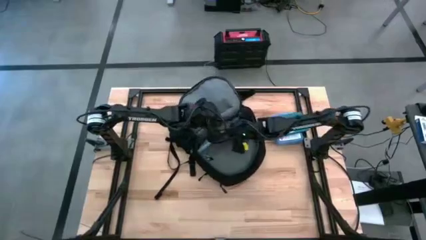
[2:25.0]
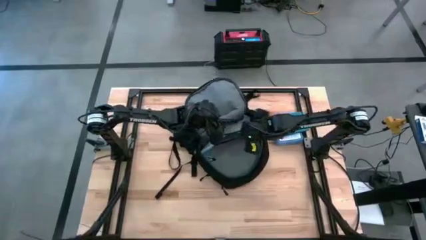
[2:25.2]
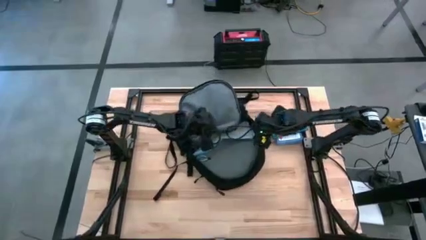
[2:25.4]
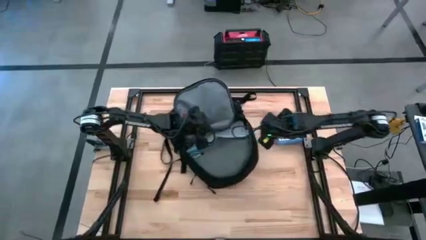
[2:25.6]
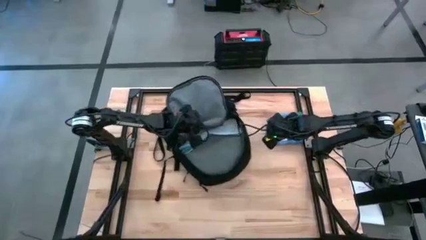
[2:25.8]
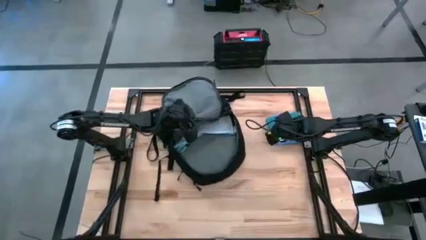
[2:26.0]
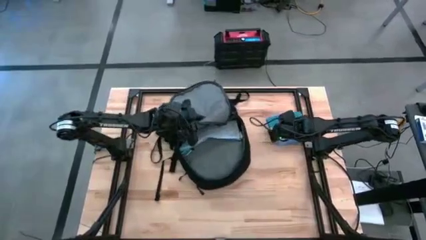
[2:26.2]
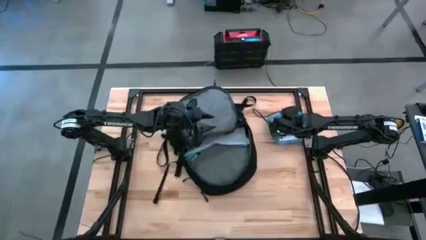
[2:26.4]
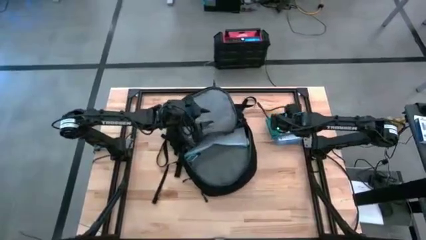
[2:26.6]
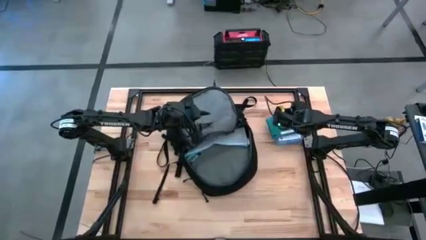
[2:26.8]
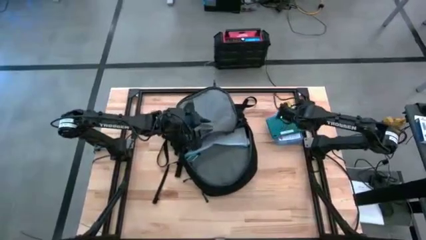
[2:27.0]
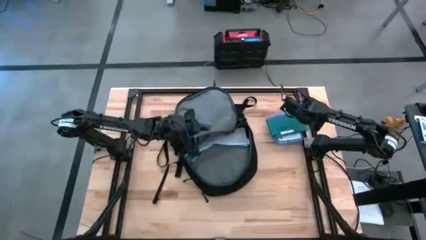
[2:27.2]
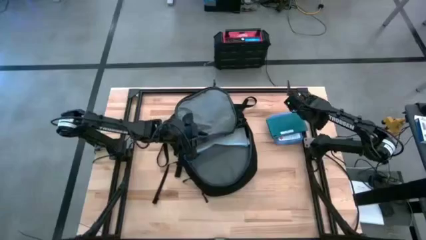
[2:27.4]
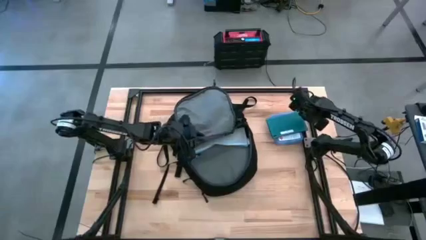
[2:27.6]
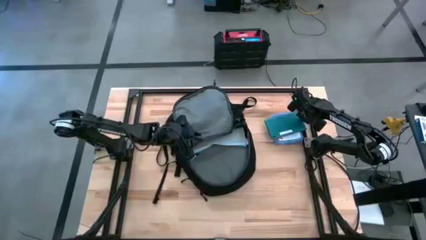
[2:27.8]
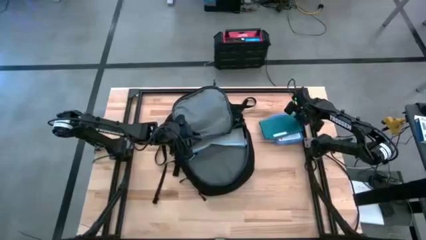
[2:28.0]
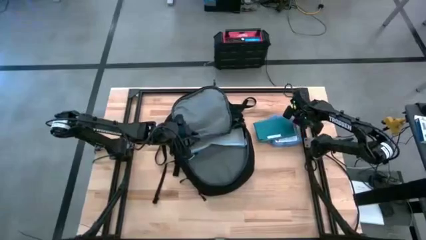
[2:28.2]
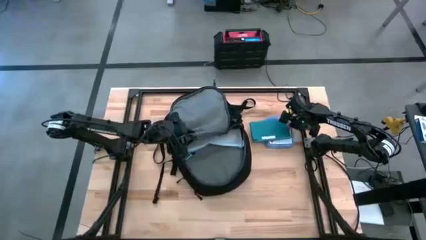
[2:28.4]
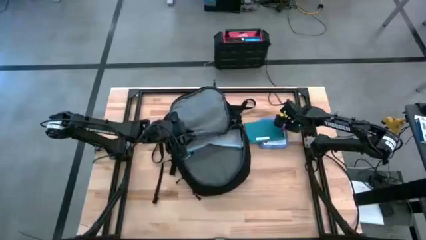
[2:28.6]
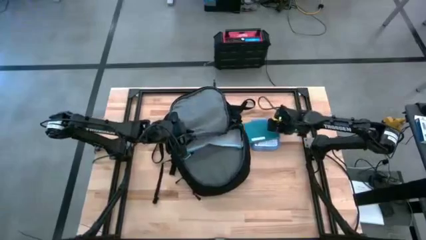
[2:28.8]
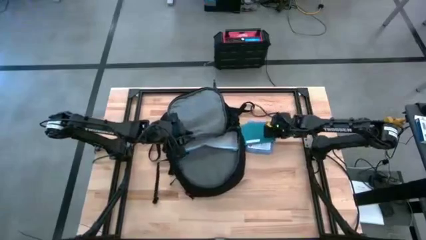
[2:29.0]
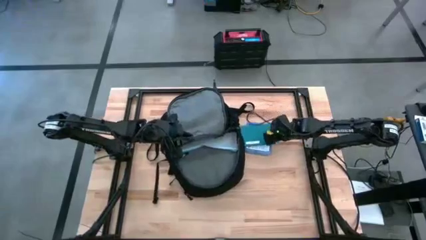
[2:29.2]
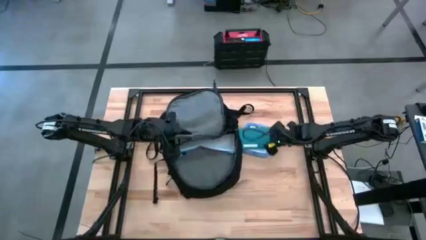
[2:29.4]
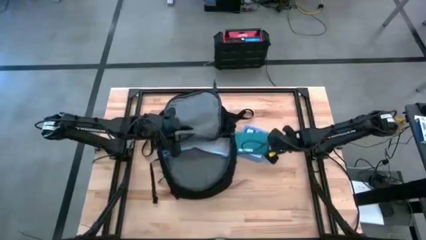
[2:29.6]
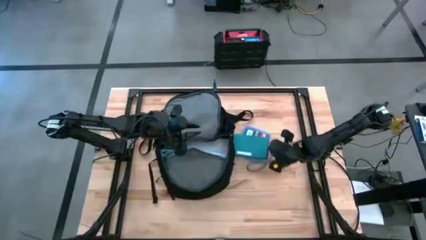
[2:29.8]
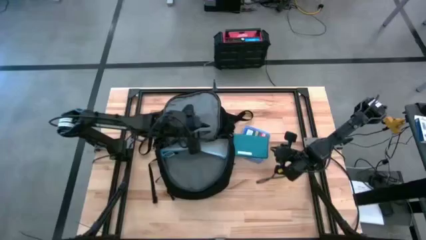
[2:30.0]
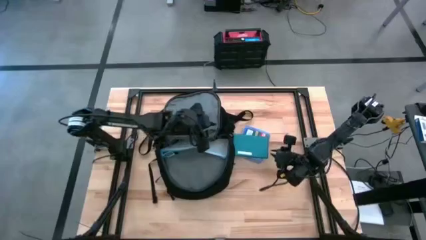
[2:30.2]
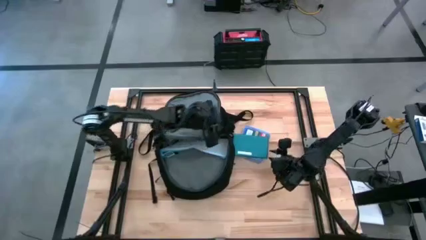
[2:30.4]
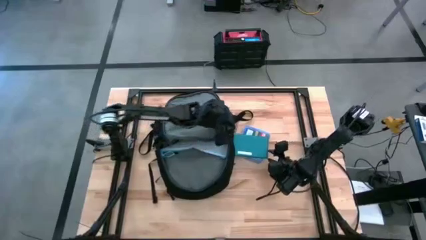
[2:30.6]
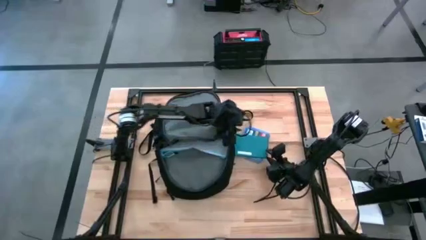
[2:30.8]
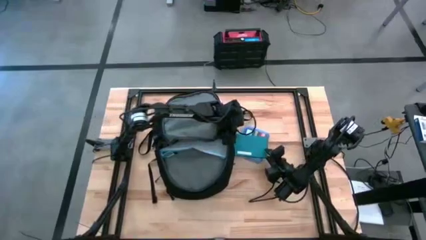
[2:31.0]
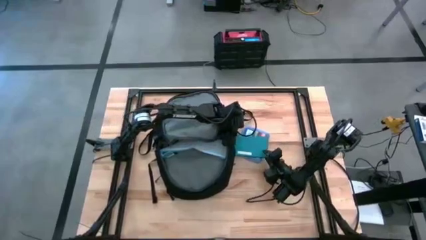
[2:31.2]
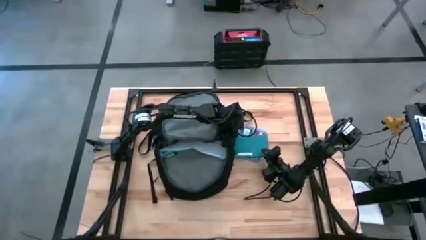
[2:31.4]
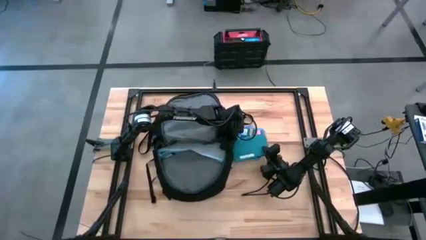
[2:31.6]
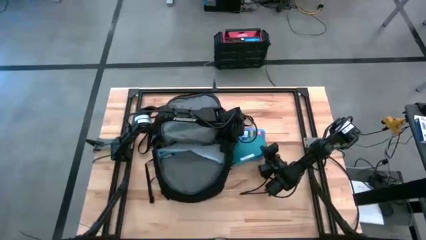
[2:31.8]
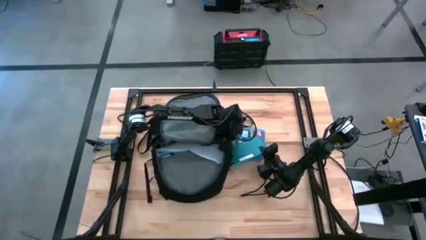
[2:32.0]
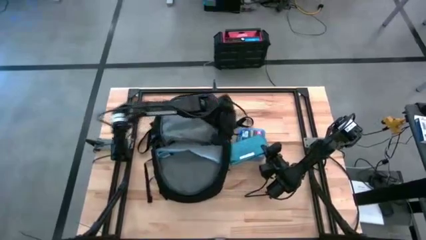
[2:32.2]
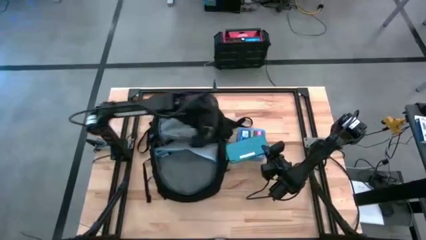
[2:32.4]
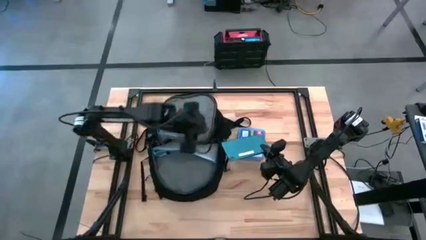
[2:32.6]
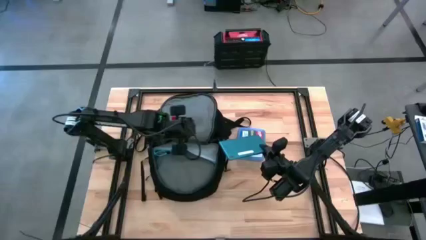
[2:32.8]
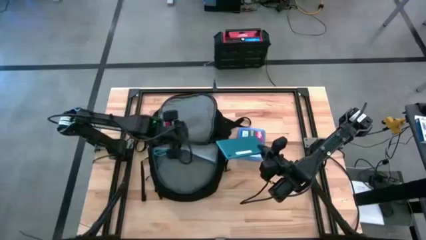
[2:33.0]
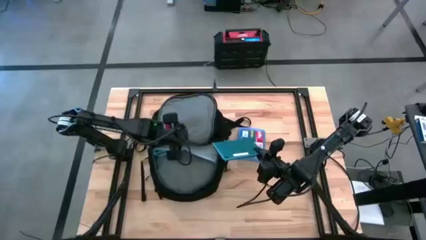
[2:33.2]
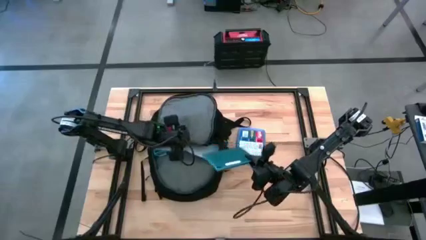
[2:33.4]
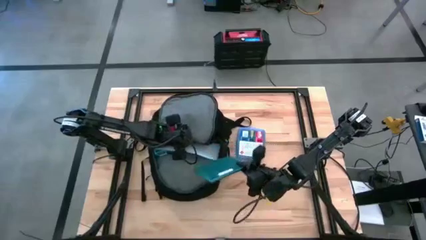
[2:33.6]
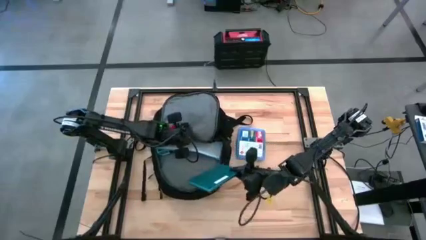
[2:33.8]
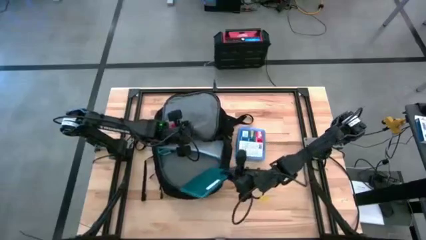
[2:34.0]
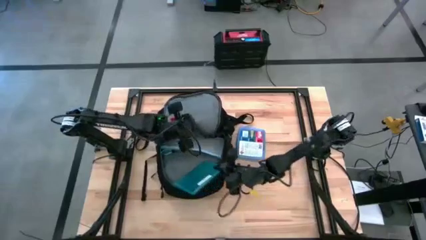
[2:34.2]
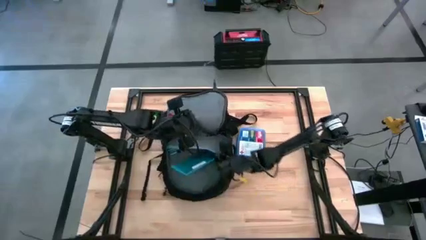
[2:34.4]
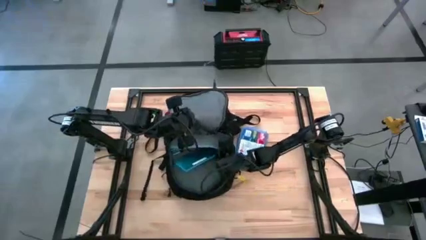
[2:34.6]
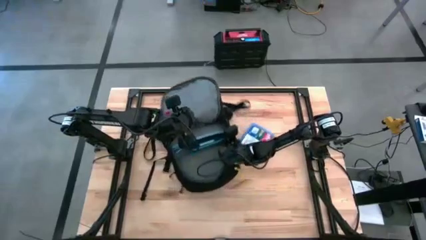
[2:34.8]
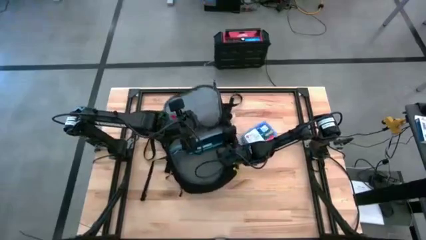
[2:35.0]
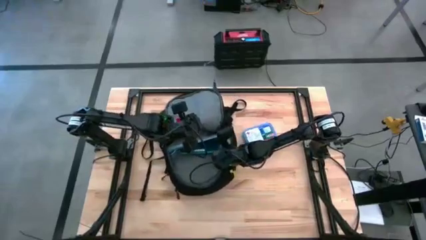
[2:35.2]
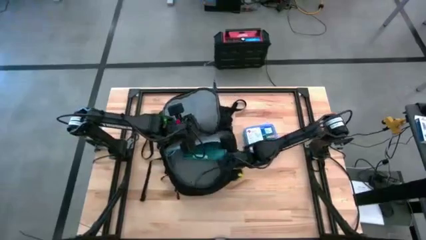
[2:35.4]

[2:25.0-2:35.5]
Task: Unpack backpack
Put the blue tablet device into the black backpack

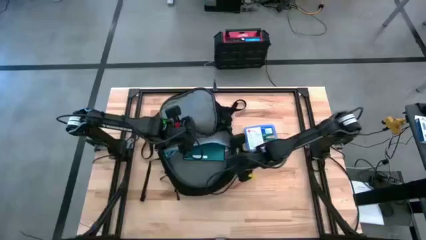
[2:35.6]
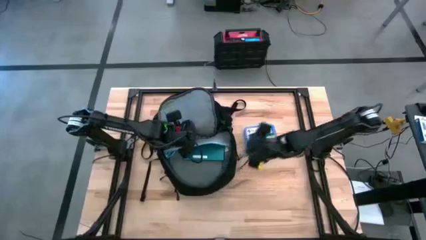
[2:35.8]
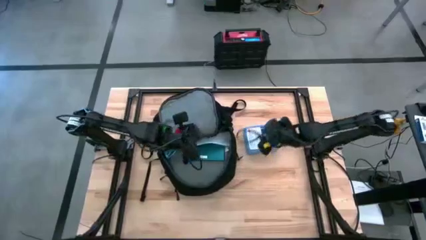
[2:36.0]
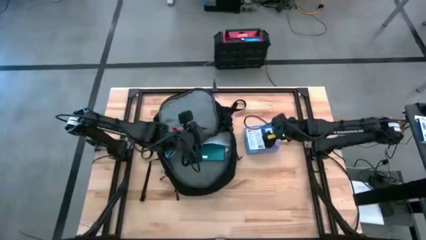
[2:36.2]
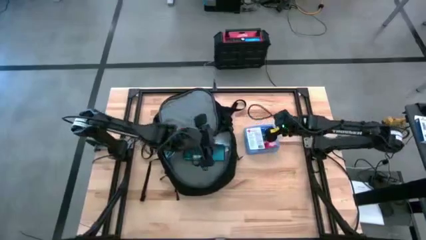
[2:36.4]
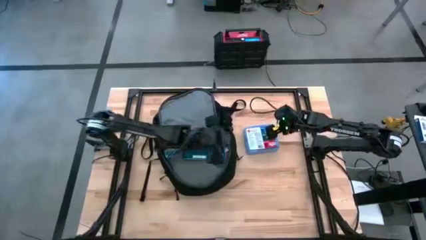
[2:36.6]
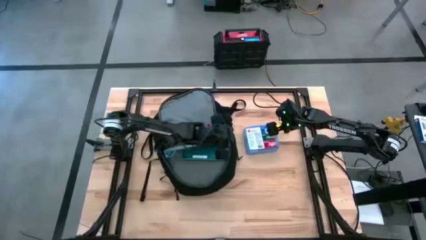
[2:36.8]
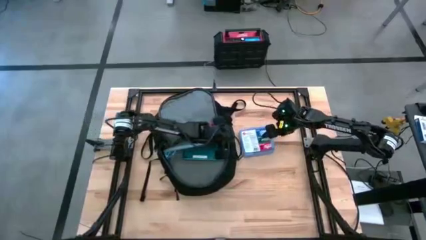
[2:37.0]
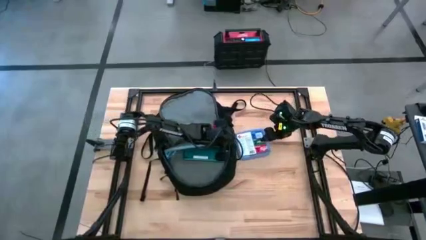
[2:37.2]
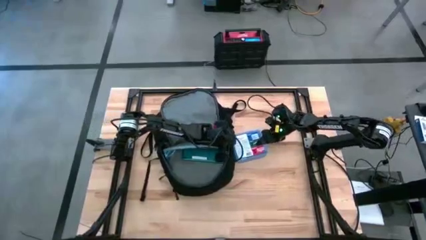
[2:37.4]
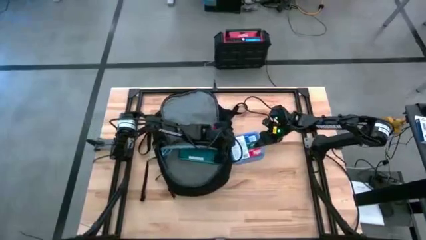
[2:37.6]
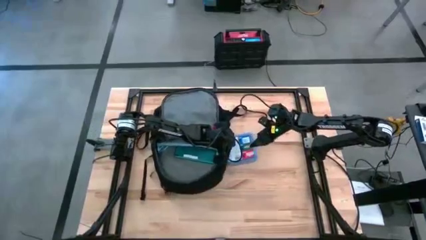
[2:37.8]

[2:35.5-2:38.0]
Put the blue first aid kit into the black backpack

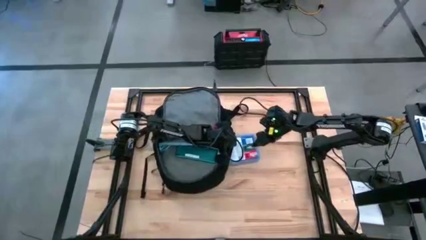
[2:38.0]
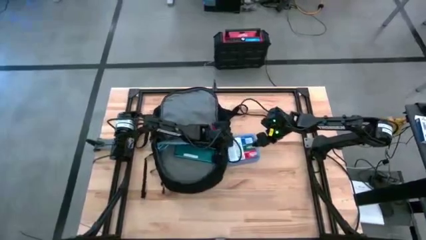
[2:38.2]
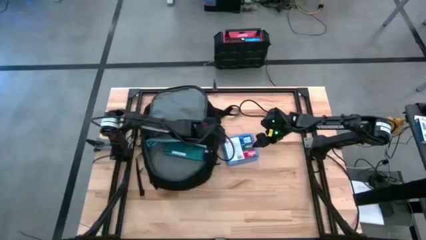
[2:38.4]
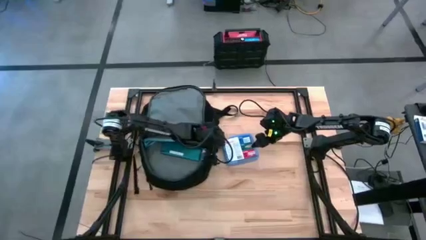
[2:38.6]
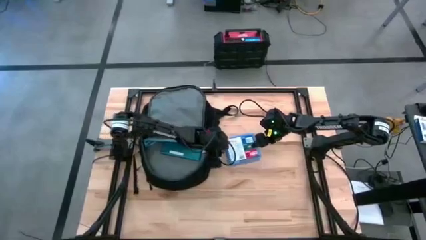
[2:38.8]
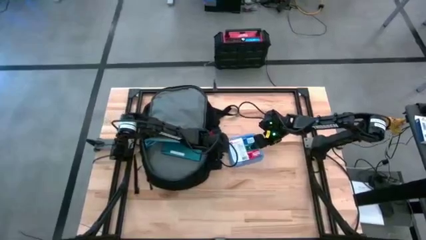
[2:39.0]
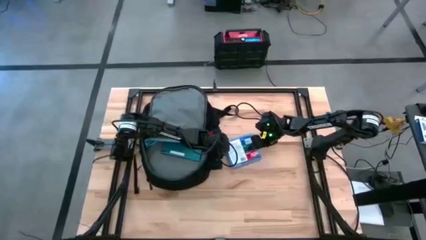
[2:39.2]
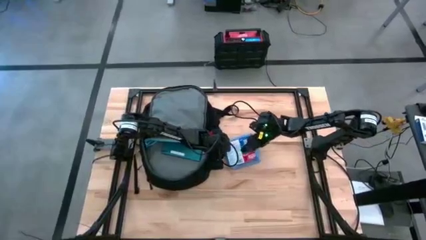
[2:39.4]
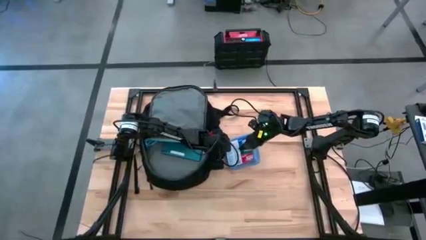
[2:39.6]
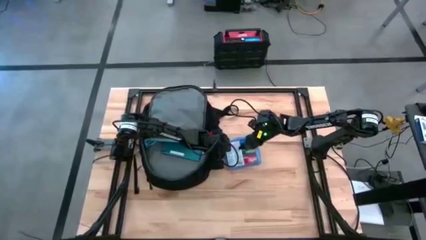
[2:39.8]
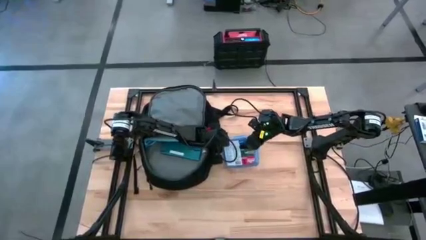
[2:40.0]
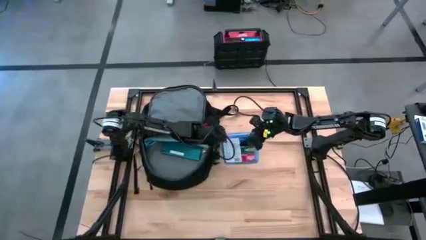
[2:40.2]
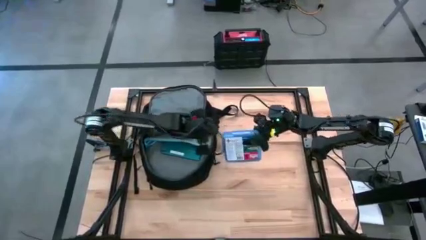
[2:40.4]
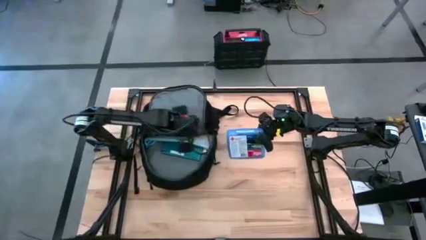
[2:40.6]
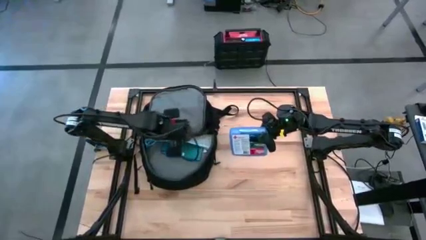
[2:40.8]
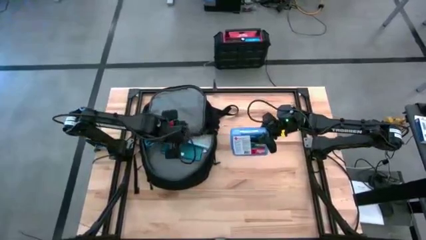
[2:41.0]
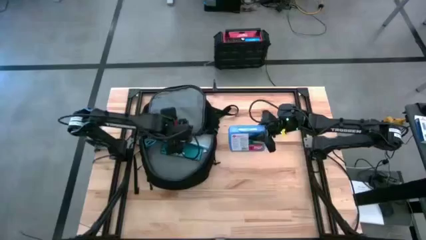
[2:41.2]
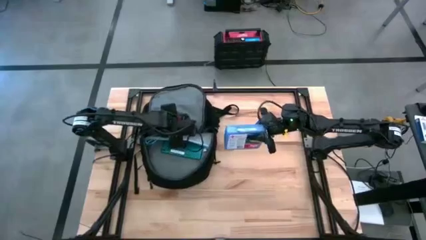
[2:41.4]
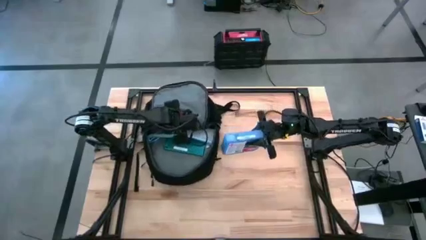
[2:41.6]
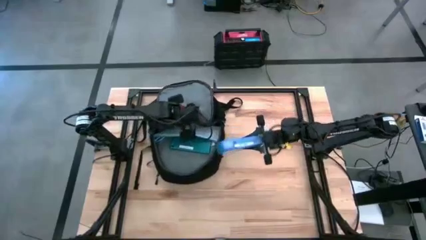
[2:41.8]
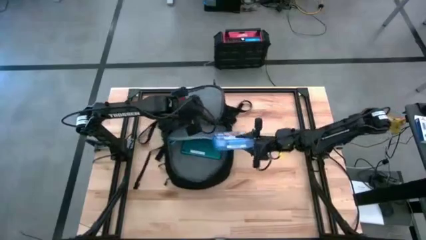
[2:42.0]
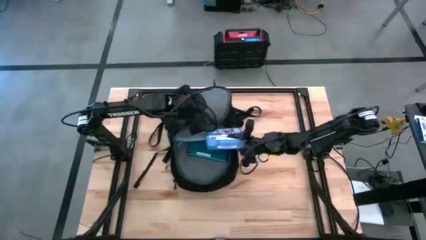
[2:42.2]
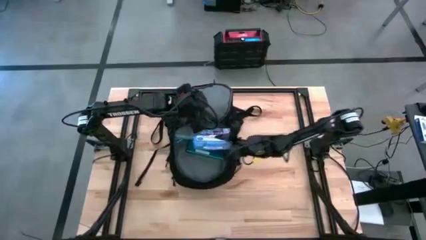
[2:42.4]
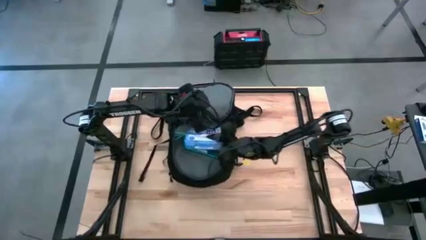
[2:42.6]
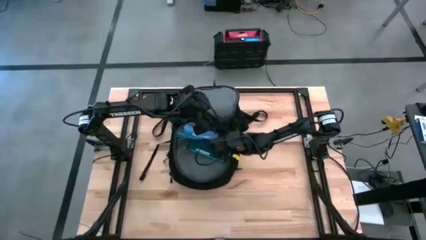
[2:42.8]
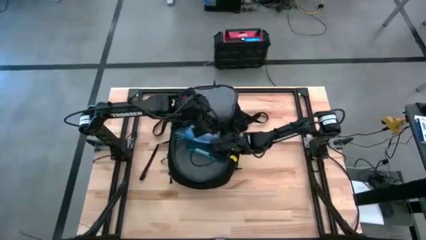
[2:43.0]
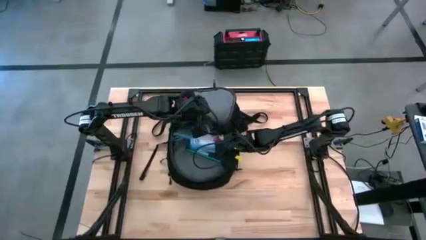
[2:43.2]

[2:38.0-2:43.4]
Put the blue first aid kit into the black backpack
